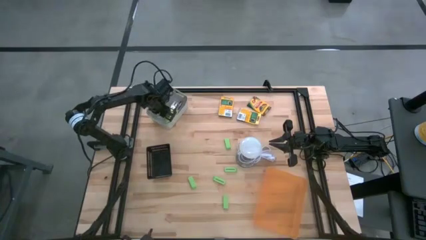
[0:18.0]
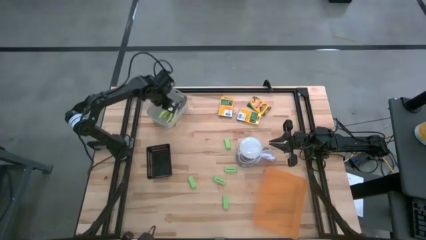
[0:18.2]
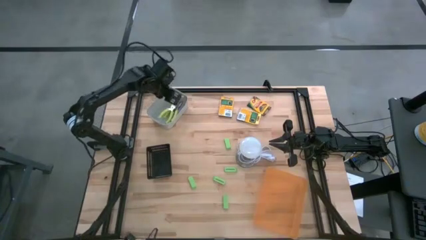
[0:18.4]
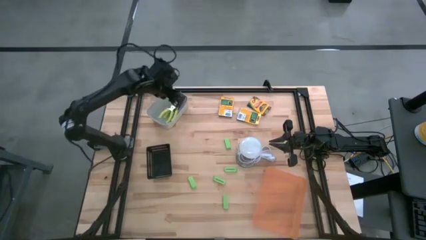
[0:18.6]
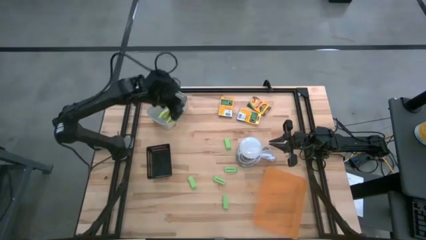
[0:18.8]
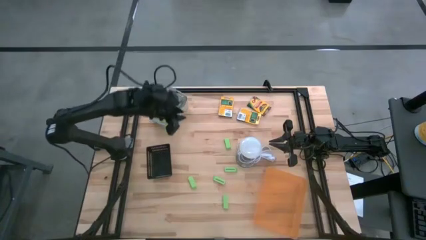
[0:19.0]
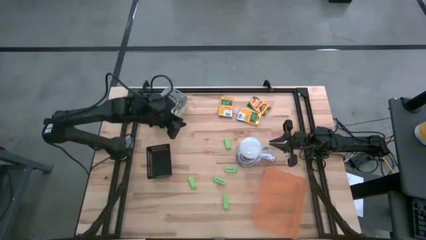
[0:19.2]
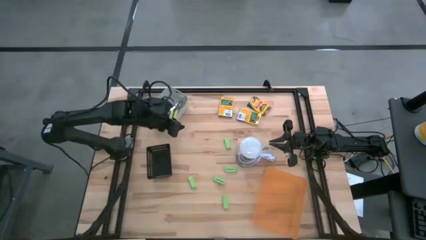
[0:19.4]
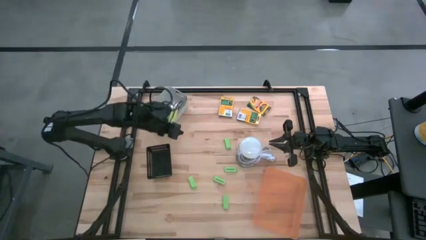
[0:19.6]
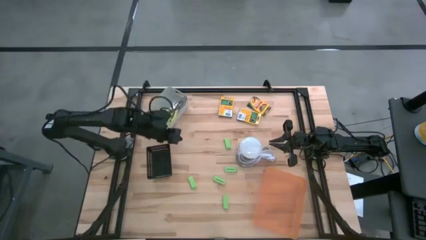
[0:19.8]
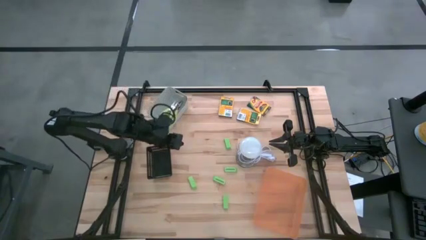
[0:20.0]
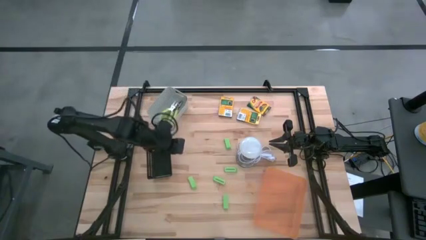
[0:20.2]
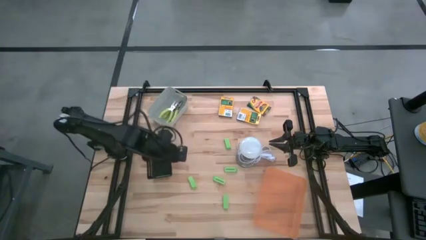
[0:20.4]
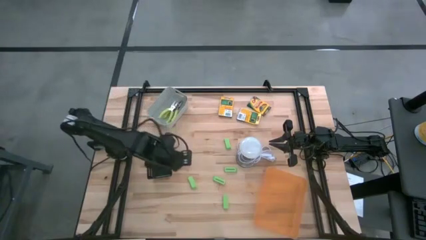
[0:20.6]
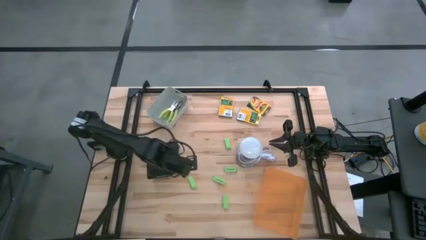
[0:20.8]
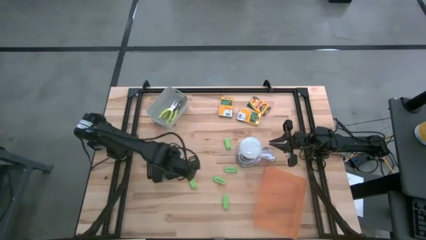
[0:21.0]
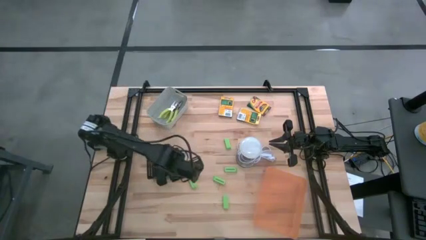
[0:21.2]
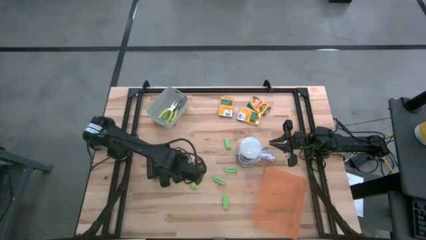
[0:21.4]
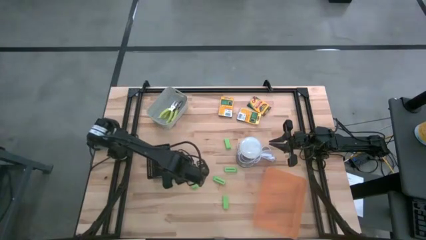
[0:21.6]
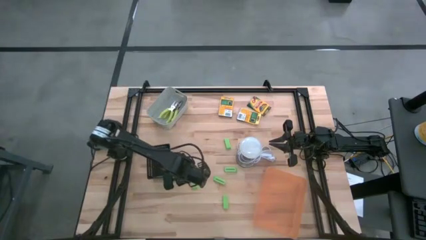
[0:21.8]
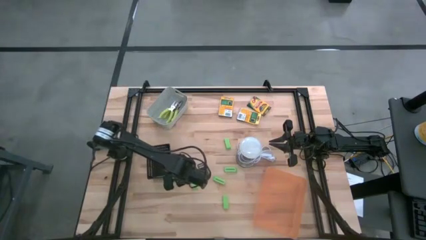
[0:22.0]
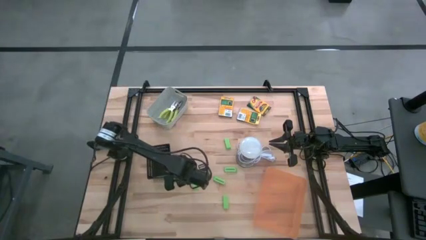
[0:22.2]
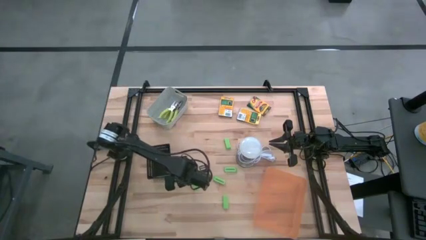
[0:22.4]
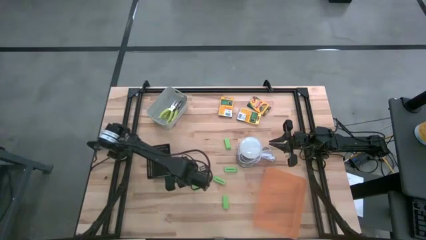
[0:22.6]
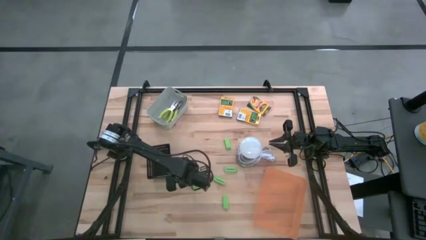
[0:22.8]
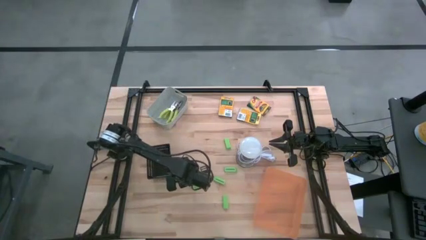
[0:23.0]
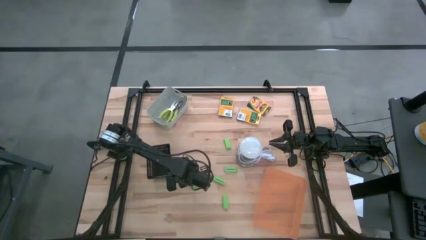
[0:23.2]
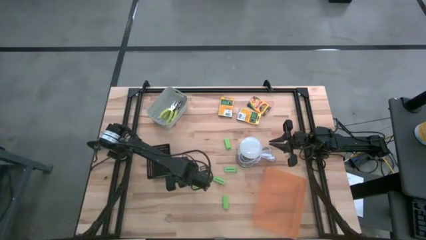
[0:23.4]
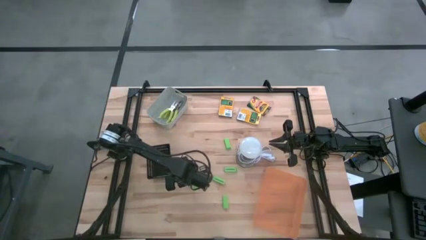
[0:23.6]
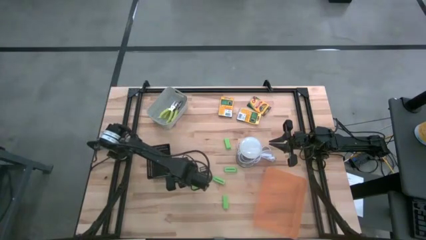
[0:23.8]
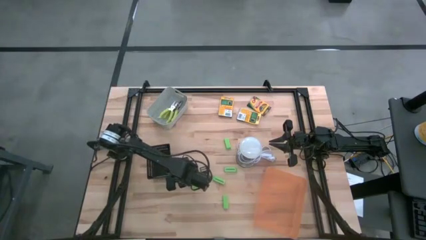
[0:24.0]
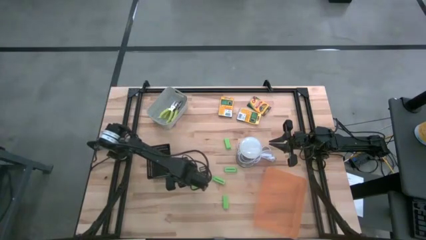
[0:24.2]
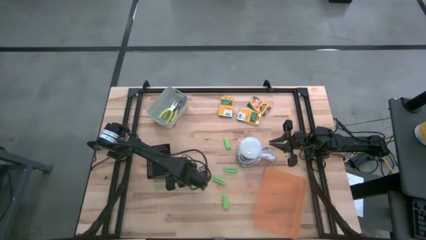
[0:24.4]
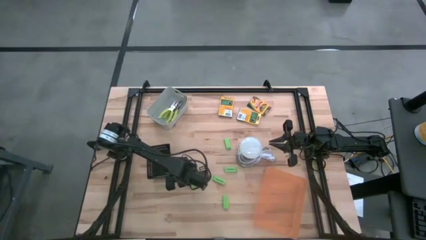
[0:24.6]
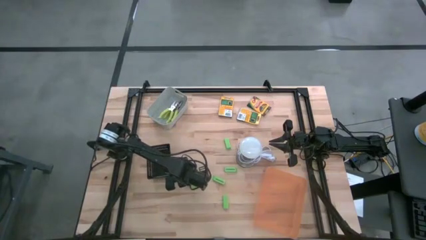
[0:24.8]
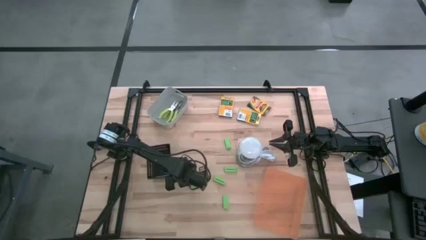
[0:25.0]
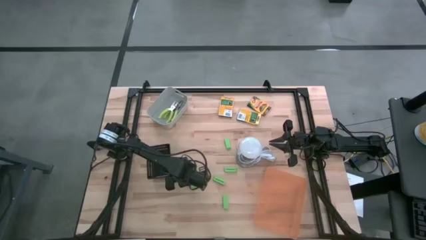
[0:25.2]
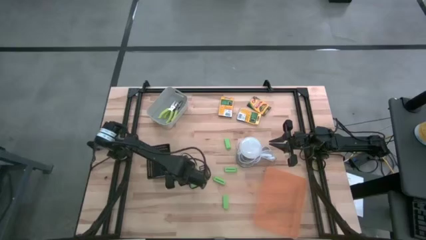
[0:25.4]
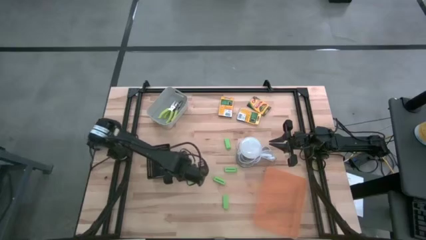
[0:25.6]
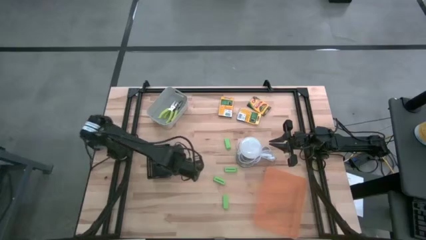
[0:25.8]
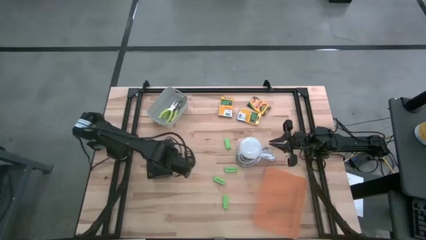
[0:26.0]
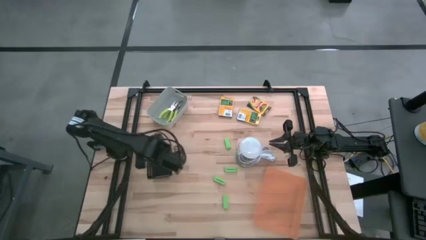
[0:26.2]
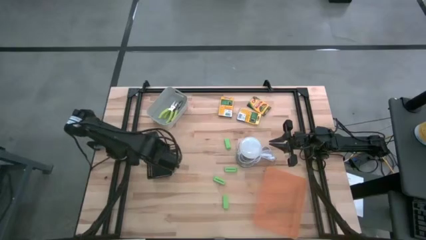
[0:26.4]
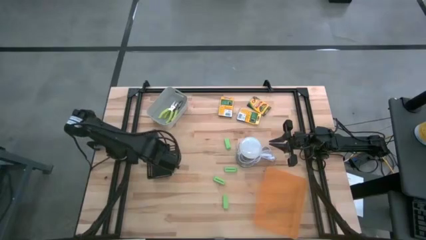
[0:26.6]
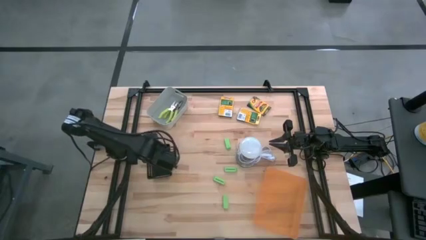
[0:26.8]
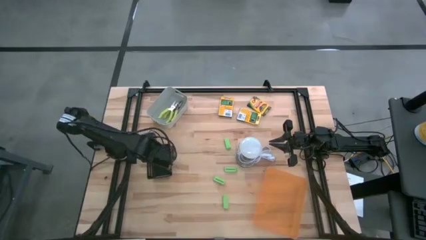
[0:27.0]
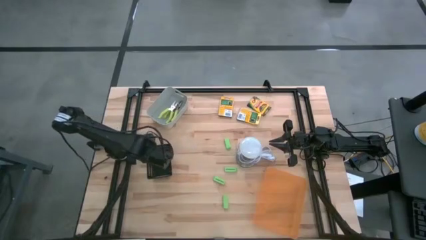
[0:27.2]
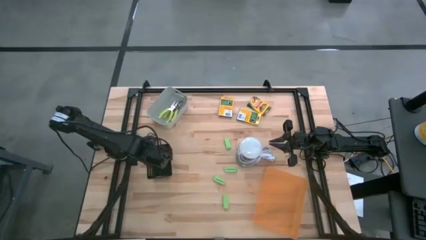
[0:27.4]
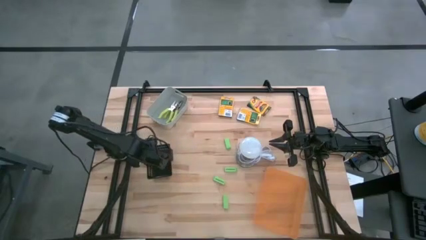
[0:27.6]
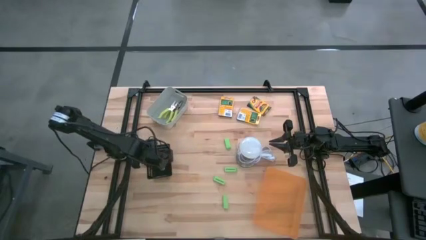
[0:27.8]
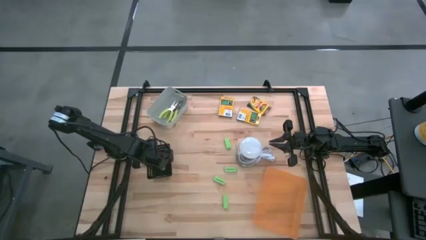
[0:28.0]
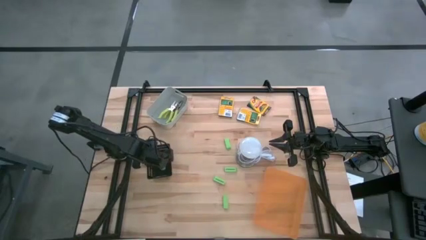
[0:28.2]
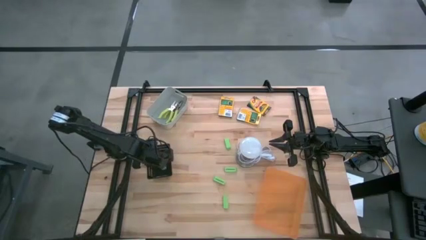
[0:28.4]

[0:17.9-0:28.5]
Task: Pick & Place School Supplies
Put the green eraser into the black bin

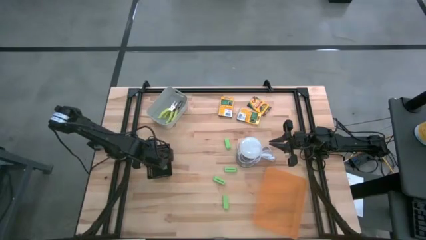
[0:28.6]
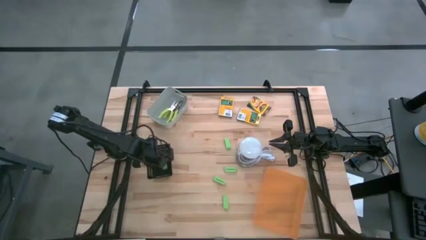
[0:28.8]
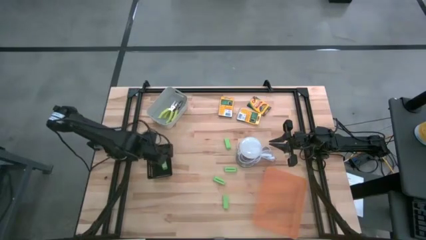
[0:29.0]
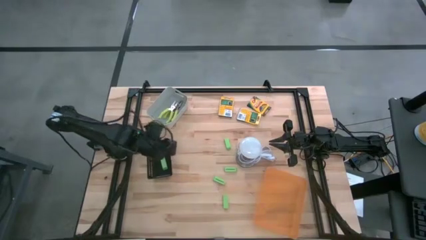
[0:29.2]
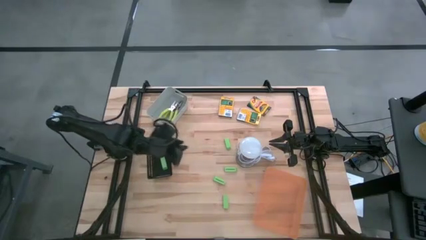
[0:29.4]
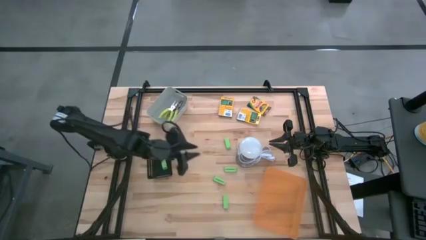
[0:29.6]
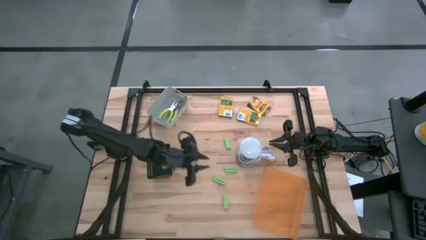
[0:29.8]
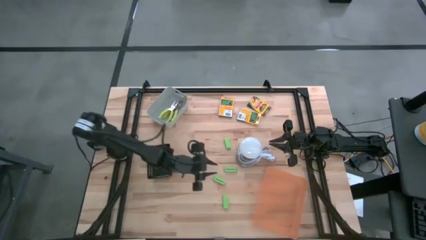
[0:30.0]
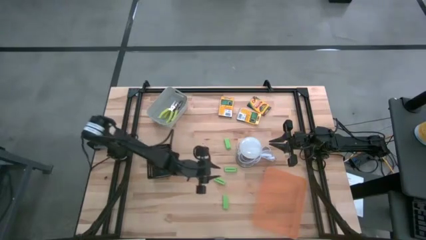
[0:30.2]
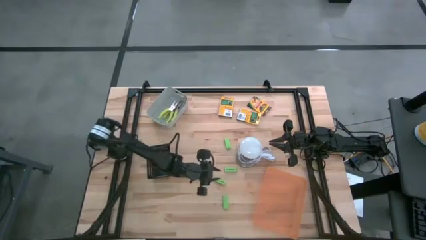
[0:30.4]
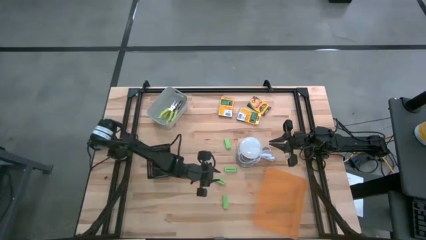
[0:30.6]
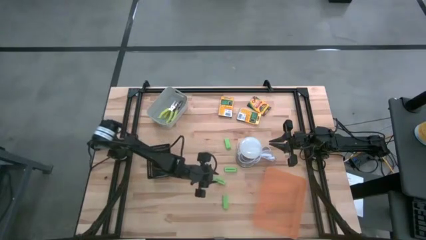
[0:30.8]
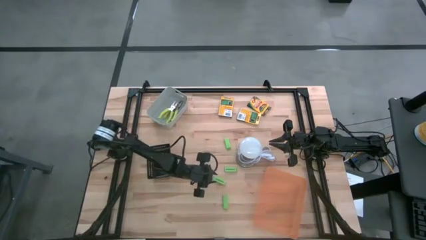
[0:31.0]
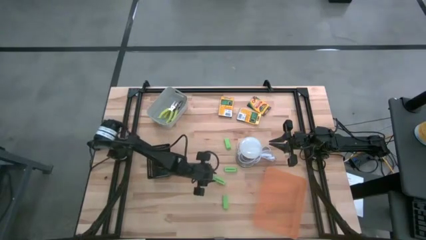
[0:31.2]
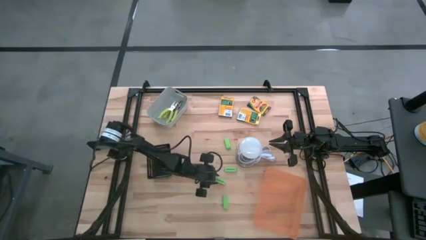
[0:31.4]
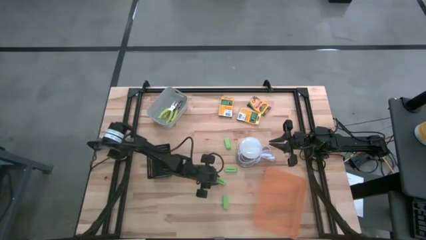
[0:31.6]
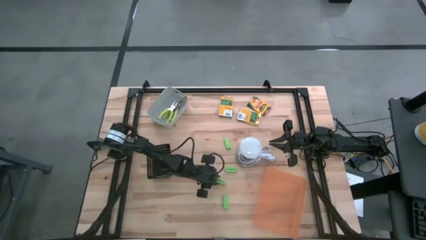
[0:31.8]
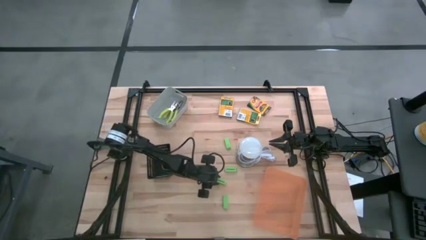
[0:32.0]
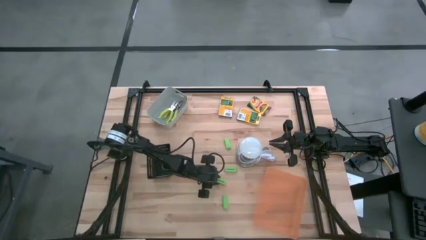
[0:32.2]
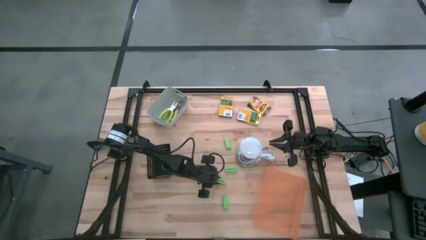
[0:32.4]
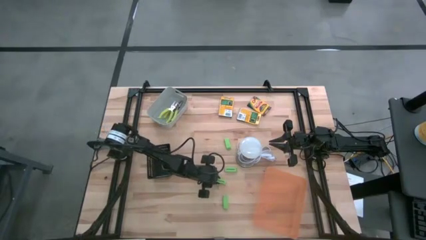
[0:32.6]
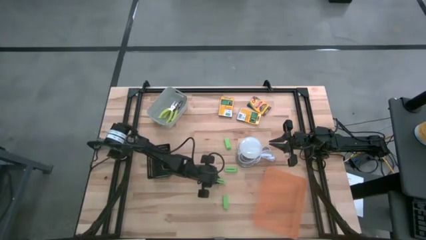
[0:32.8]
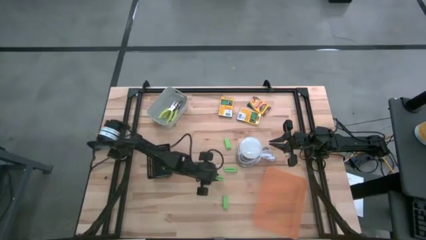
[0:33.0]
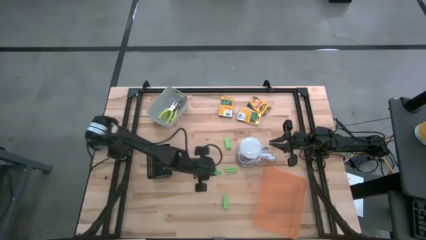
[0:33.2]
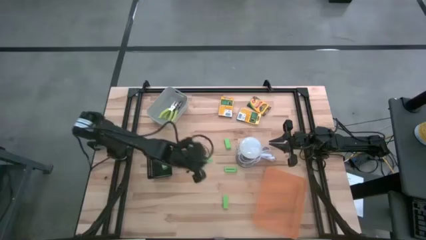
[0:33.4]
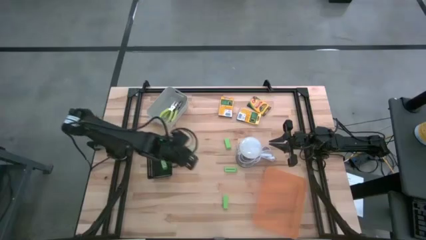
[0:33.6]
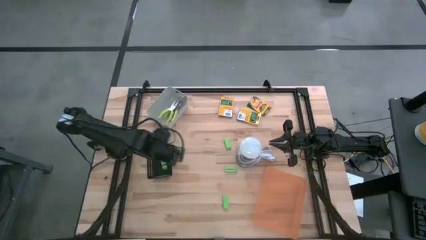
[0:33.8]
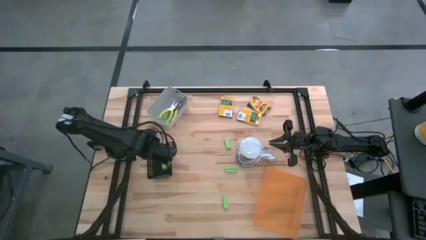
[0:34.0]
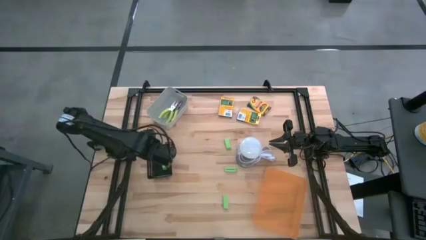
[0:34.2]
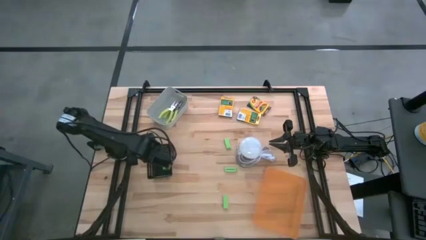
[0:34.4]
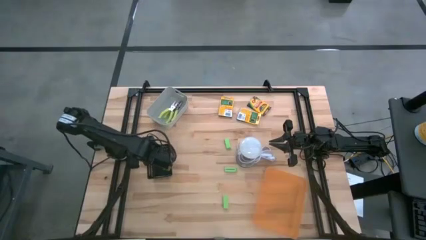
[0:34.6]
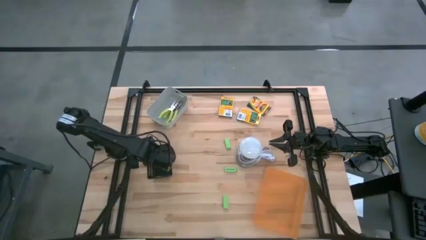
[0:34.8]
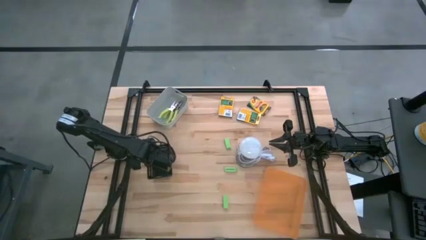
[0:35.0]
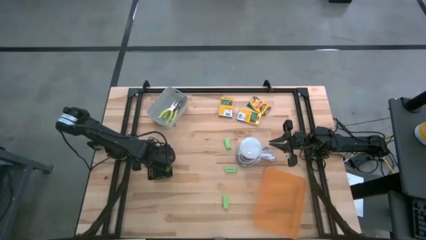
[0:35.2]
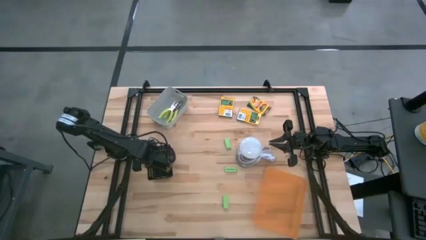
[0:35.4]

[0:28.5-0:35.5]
Put the green eraser into the black bin
